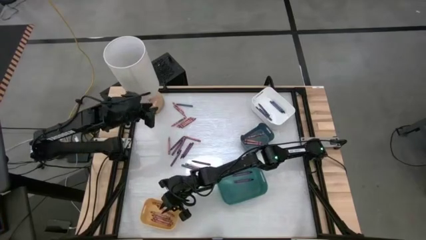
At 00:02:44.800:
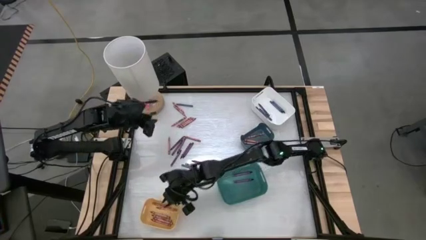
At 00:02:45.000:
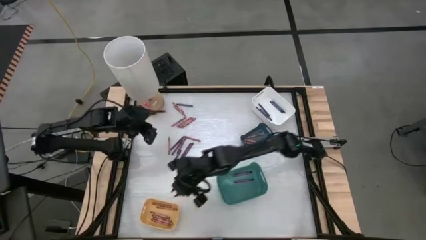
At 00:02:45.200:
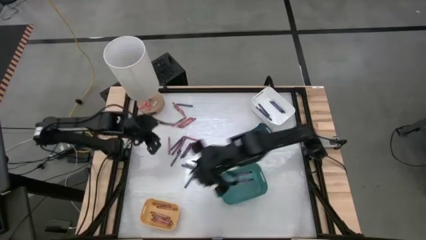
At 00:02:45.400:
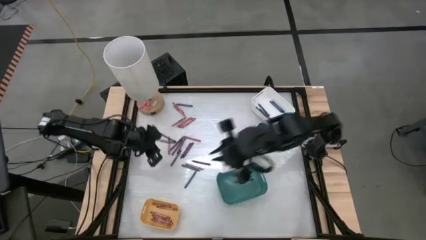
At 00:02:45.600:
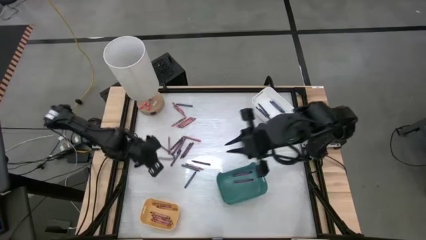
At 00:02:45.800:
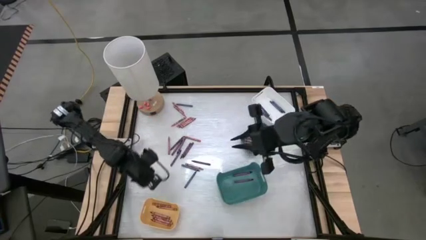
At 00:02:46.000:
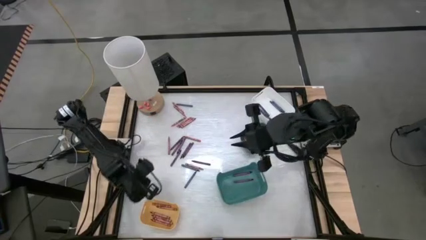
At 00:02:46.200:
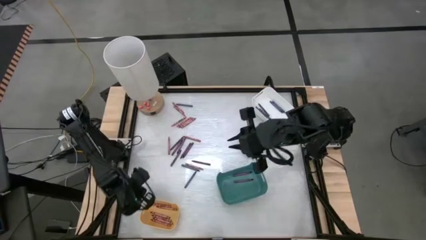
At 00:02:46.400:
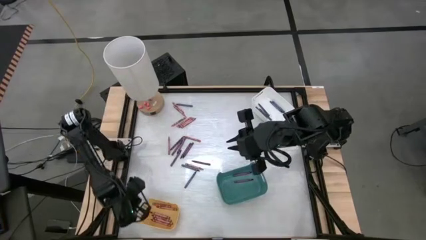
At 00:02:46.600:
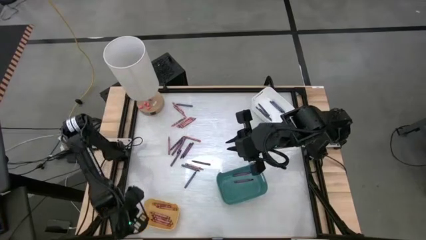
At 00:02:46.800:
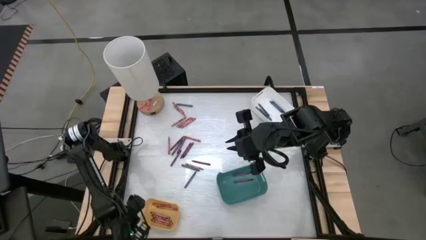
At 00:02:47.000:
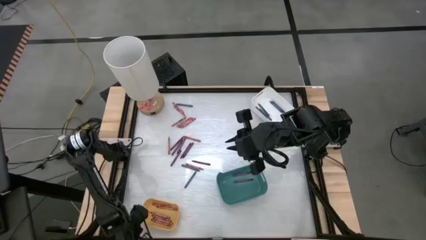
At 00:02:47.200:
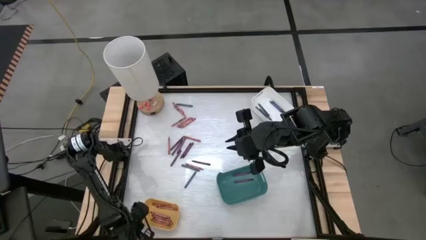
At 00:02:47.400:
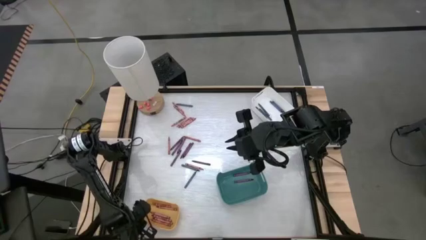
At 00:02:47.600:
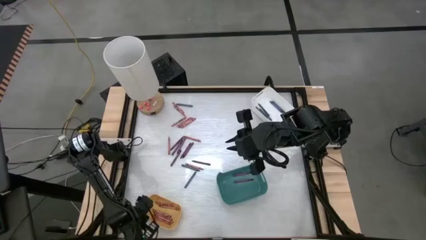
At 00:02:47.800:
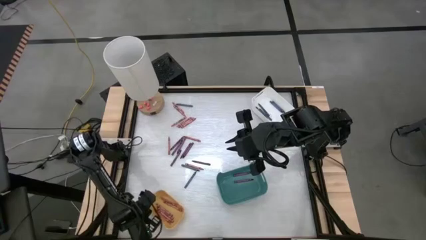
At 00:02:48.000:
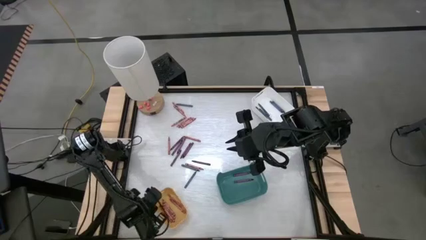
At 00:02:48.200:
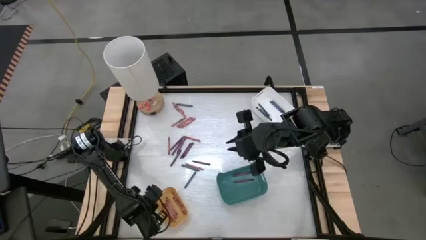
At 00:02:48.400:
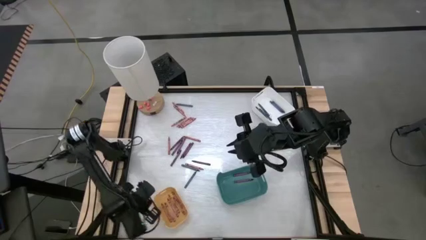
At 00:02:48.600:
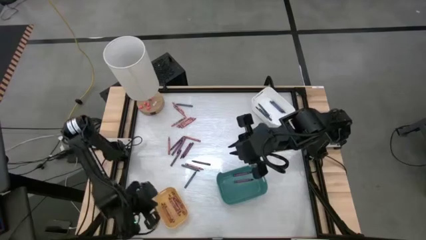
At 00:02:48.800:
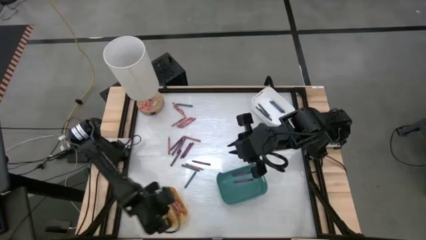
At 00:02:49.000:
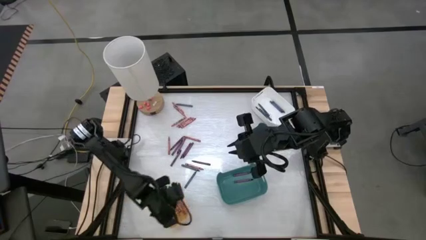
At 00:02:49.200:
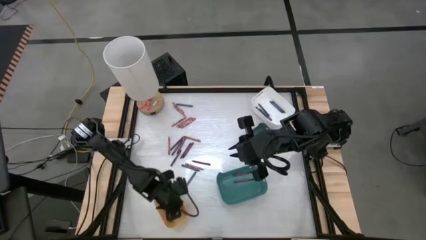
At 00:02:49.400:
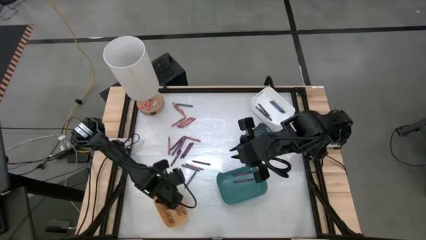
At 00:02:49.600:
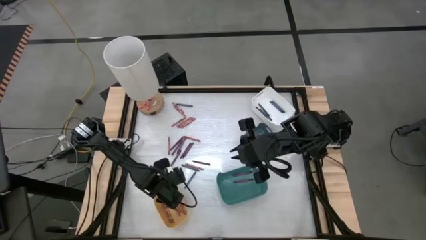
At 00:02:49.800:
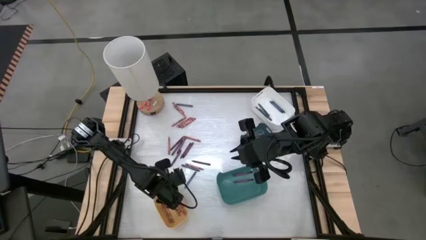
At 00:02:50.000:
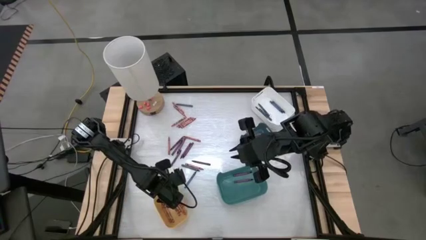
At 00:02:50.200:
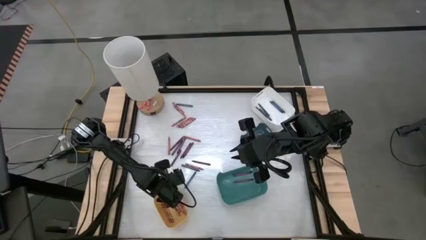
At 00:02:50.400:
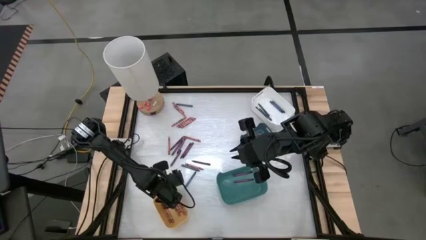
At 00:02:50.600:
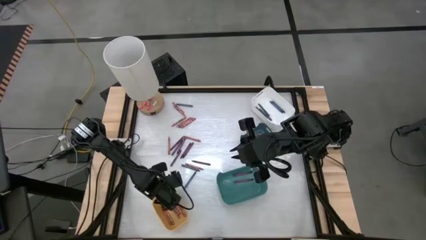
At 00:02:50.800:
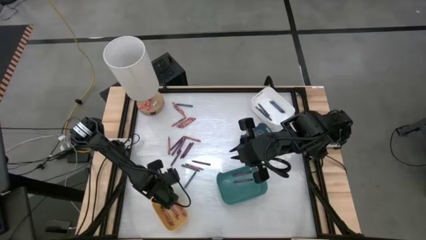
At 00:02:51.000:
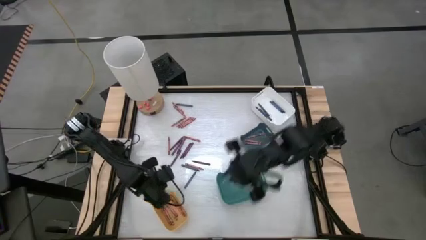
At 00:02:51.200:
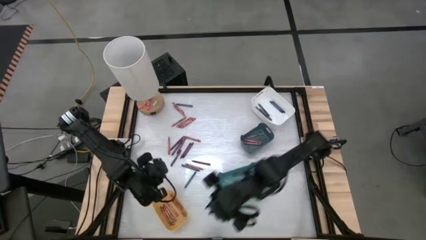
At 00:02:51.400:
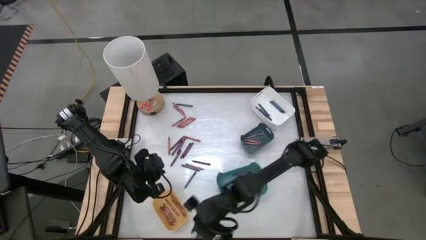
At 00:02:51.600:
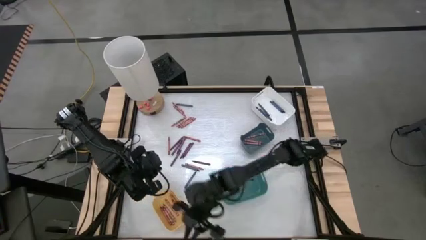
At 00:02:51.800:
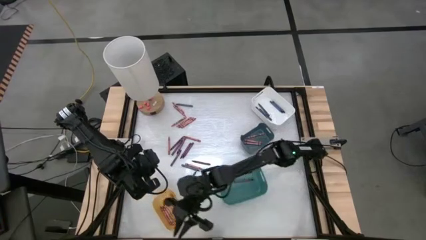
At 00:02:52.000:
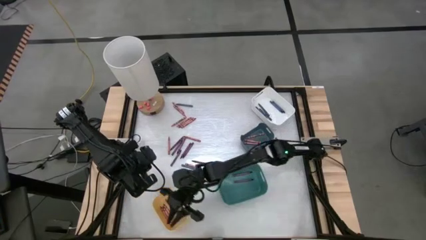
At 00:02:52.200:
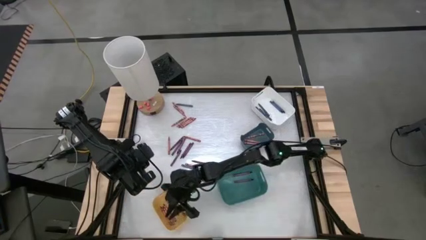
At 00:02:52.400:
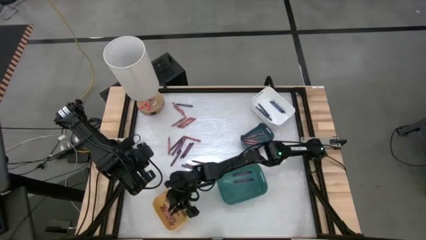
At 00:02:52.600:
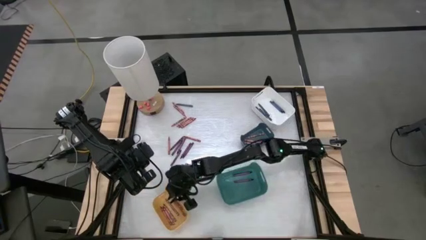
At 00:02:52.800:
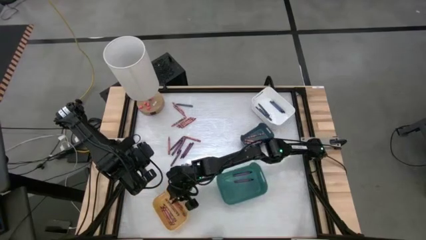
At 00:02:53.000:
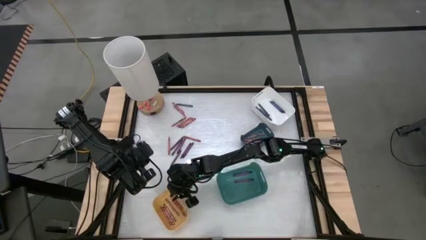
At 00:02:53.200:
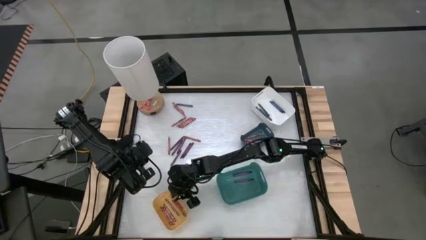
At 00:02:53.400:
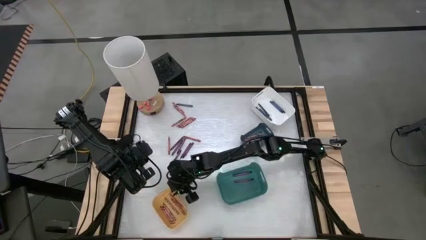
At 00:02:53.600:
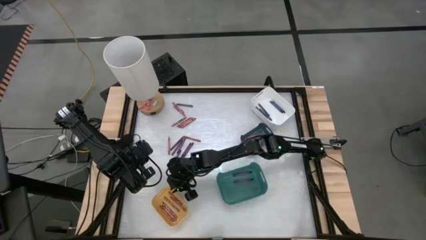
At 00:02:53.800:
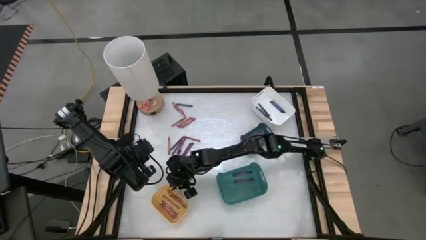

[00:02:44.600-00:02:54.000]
Task: Sort crayons
Adjust the yellow bin

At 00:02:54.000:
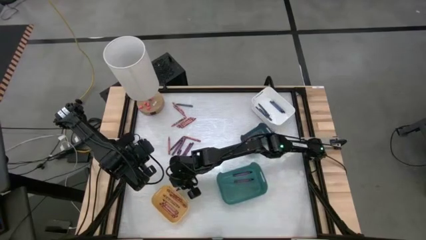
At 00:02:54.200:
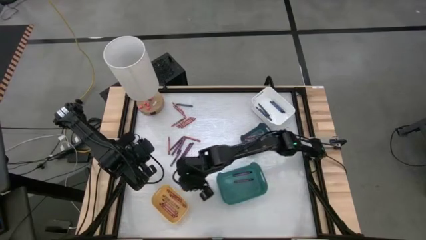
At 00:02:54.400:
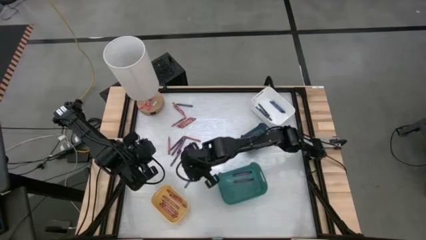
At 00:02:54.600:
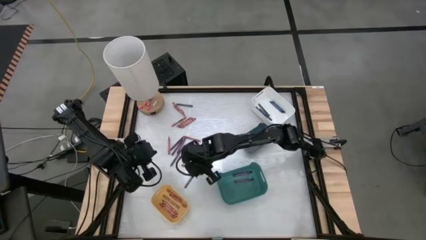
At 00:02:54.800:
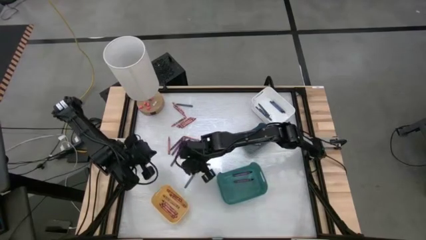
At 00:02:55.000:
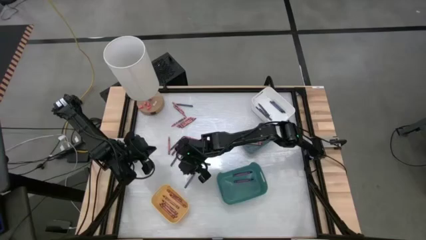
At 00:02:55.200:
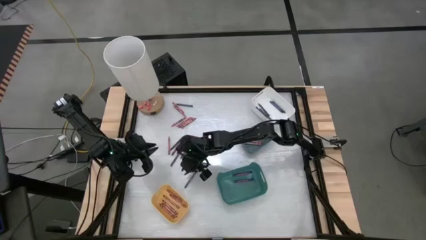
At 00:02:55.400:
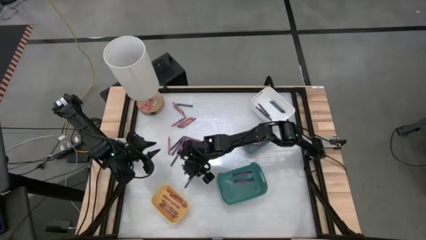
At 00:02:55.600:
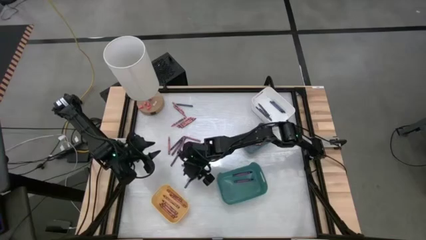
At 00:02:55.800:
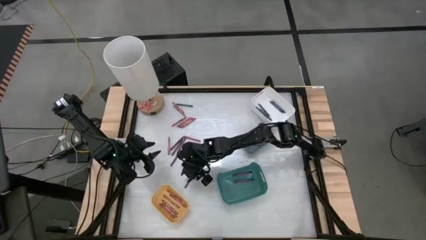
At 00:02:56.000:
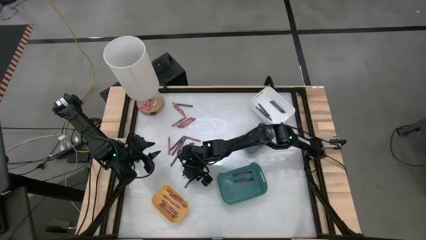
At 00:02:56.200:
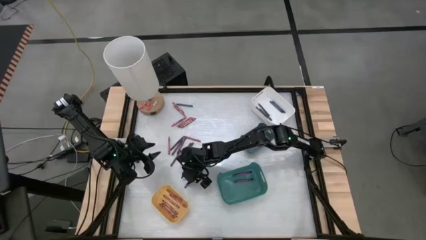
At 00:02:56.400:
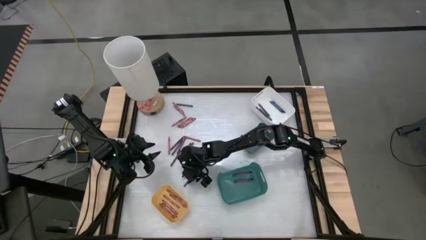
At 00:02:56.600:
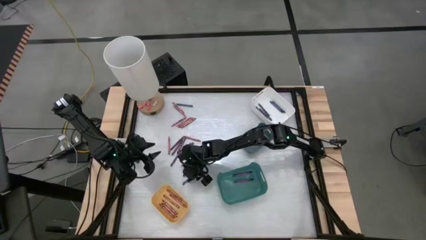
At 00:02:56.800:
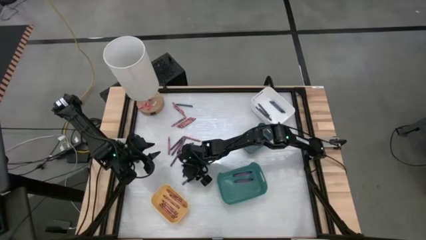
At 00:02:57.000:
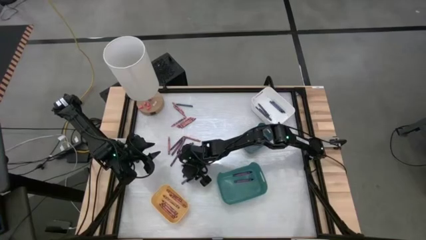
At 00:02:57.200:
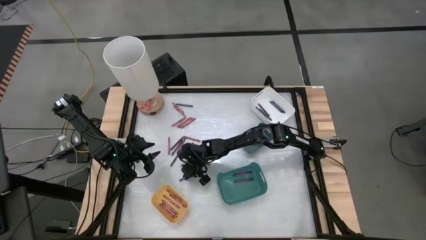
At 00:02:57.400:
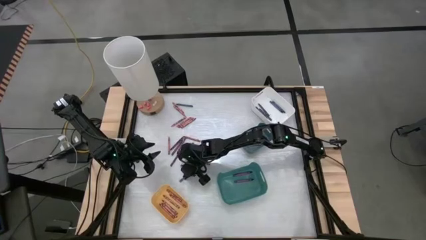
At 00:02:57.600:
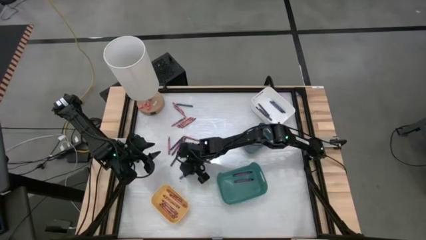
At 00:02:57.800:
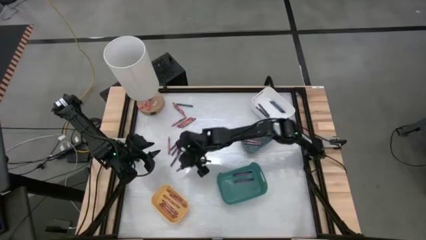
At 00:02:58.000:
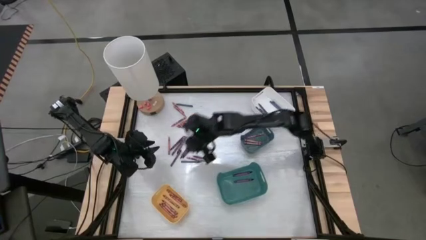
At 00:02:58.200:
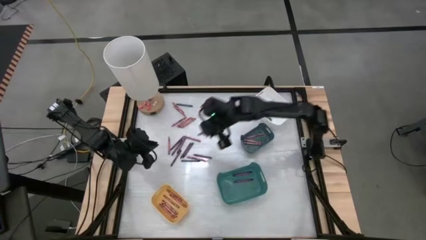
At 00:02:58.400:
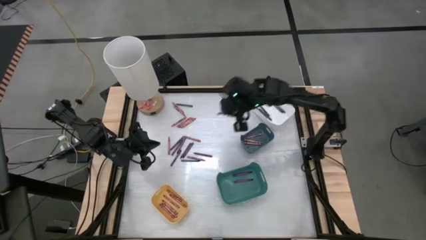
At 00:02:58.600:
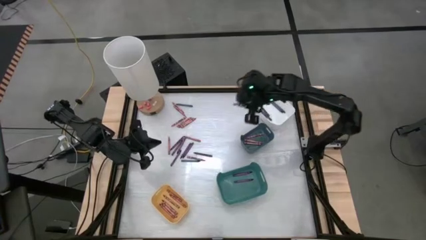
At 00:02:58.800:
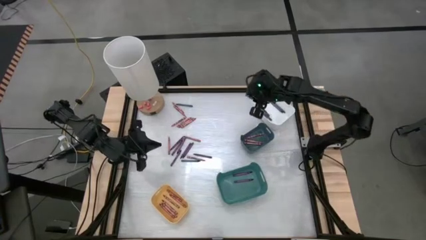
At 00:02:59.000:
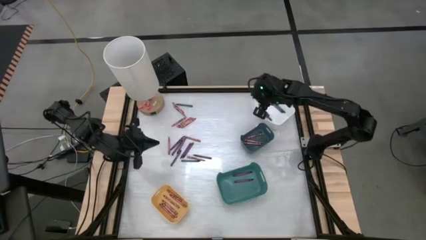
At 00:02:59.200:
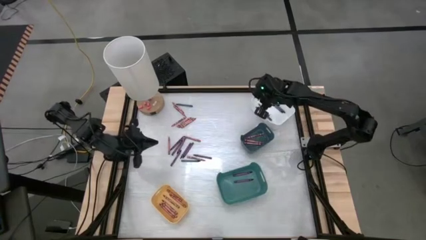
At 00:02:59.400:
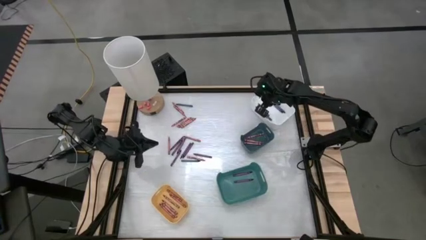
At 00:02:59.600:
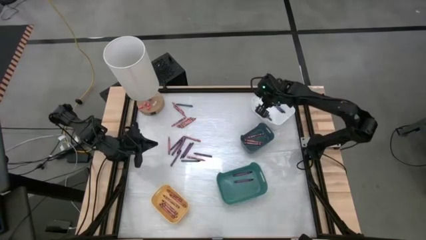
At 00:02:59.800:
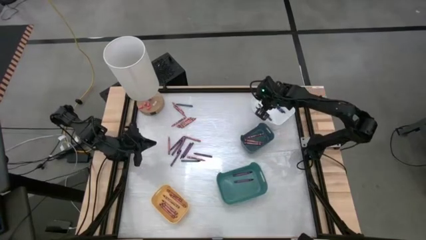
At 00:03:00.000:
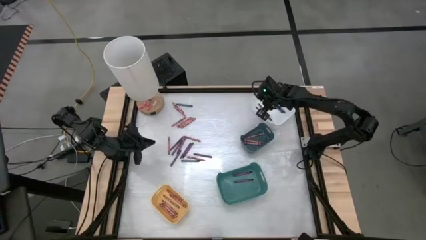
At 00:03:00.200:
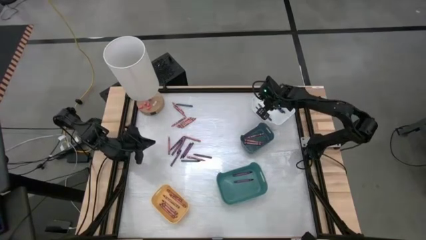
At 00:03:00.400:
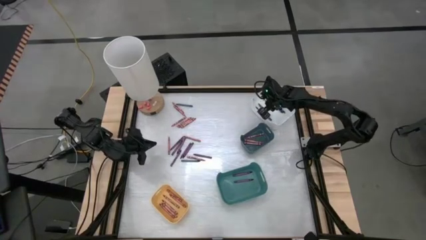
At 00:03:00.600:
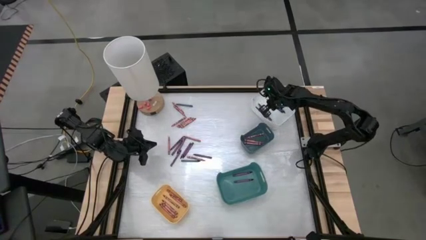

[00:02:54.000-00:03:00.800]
Put the blue crayon into the white bin
